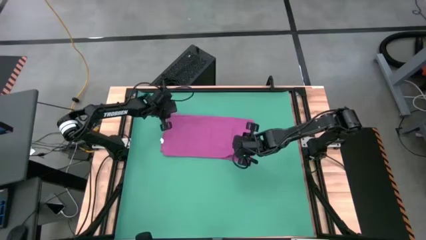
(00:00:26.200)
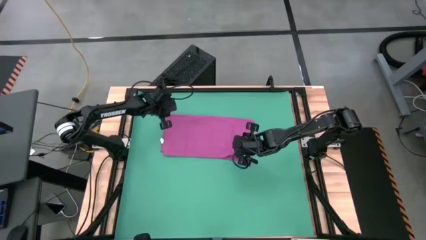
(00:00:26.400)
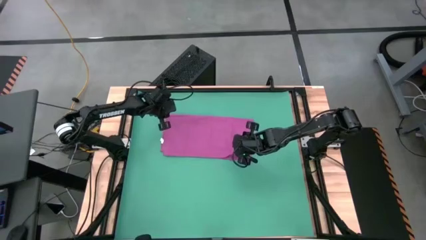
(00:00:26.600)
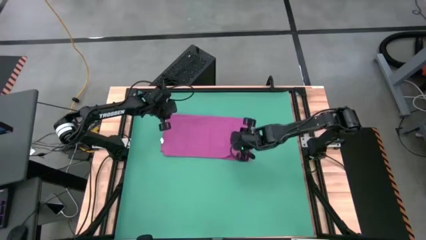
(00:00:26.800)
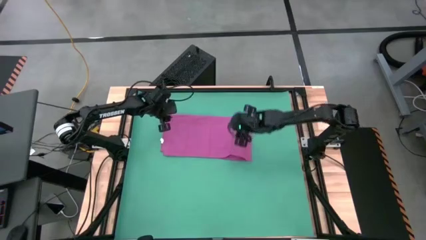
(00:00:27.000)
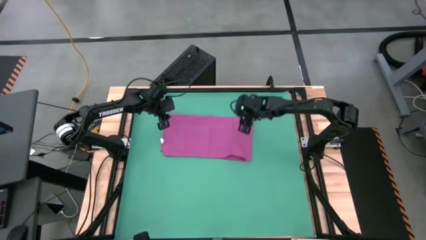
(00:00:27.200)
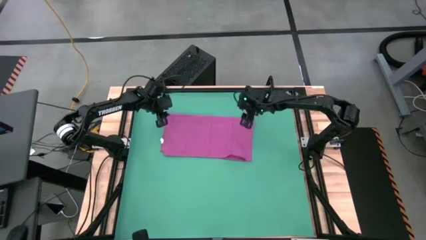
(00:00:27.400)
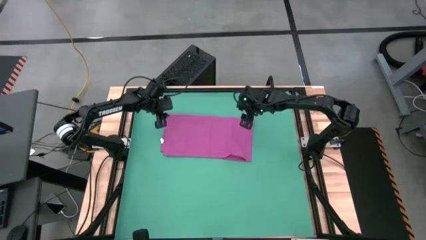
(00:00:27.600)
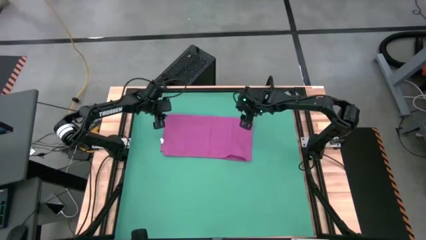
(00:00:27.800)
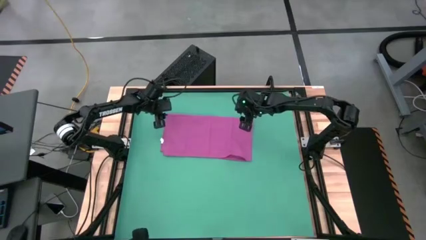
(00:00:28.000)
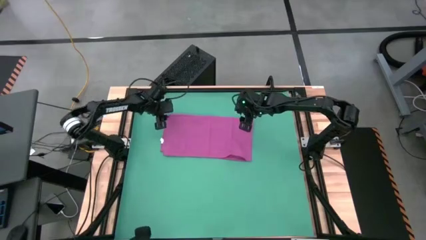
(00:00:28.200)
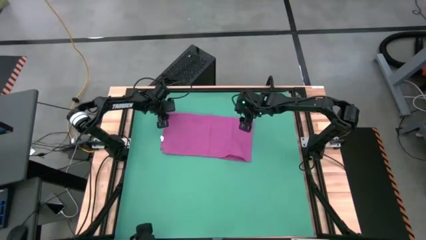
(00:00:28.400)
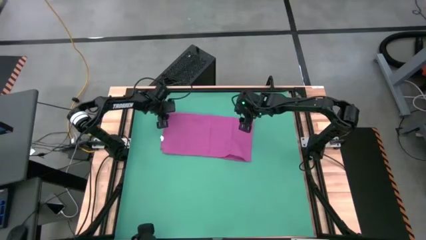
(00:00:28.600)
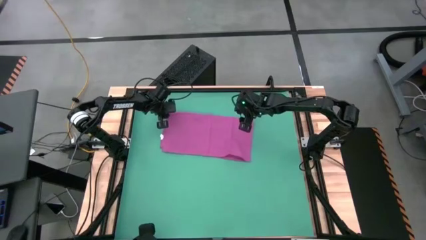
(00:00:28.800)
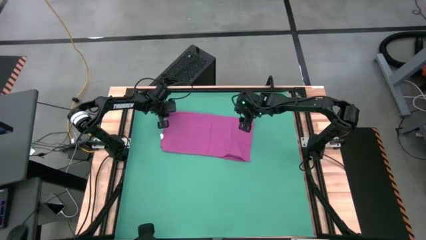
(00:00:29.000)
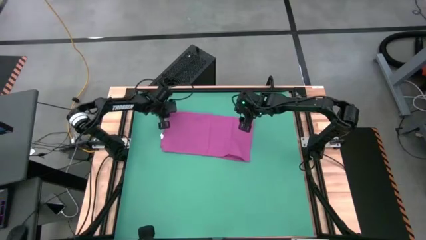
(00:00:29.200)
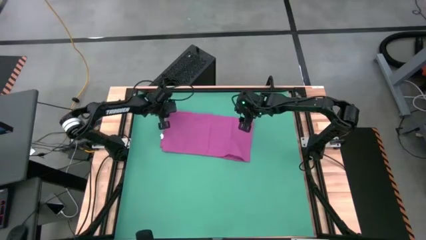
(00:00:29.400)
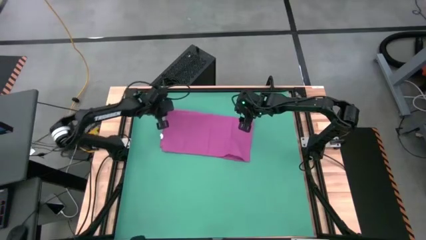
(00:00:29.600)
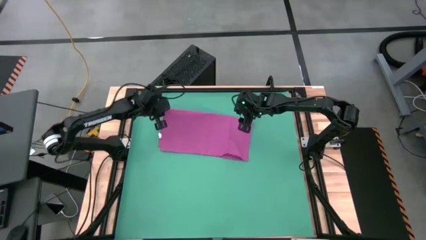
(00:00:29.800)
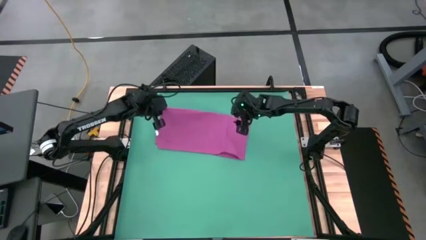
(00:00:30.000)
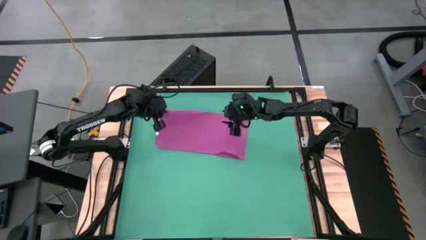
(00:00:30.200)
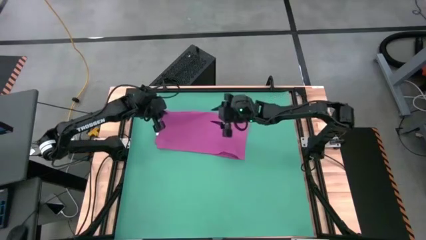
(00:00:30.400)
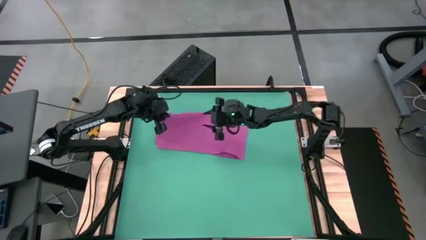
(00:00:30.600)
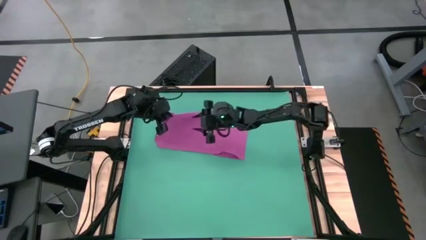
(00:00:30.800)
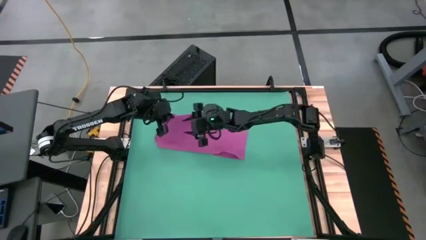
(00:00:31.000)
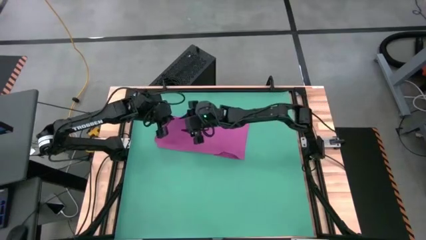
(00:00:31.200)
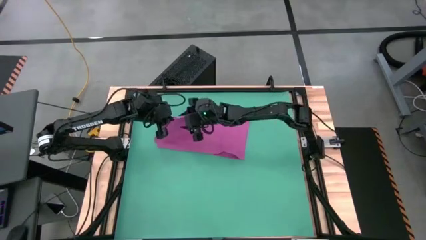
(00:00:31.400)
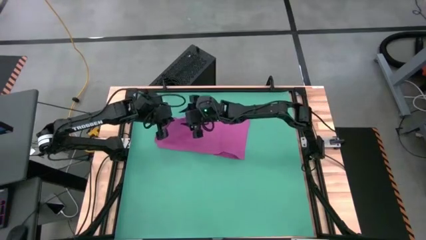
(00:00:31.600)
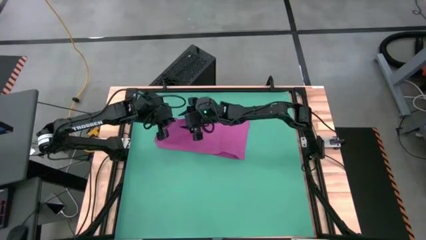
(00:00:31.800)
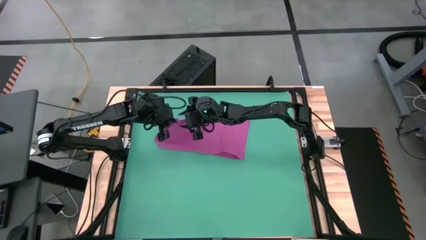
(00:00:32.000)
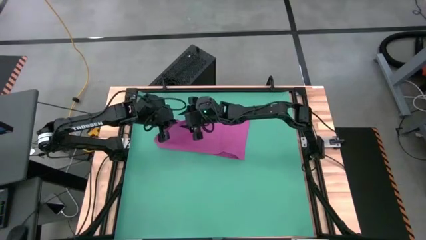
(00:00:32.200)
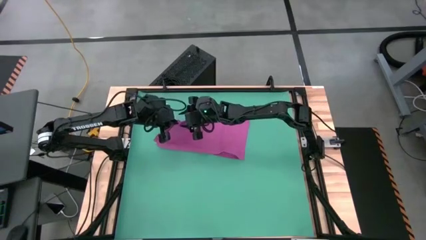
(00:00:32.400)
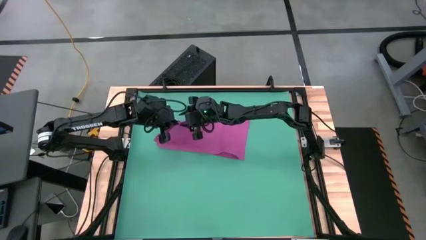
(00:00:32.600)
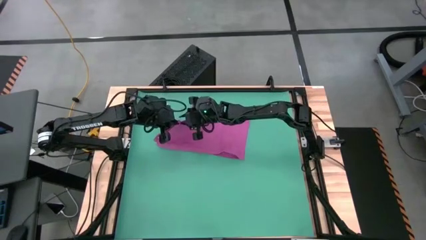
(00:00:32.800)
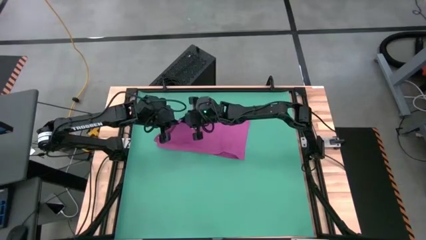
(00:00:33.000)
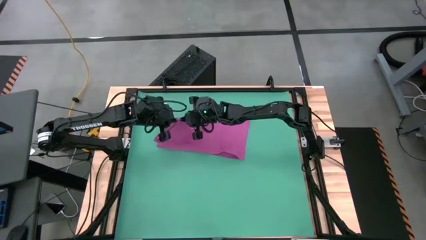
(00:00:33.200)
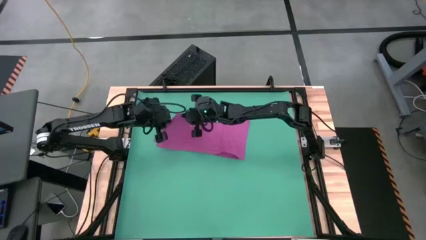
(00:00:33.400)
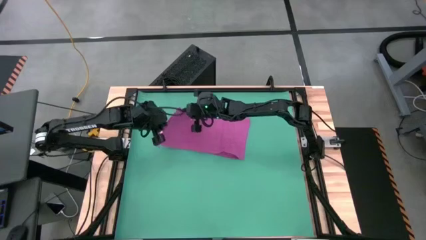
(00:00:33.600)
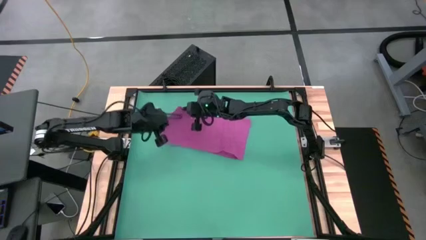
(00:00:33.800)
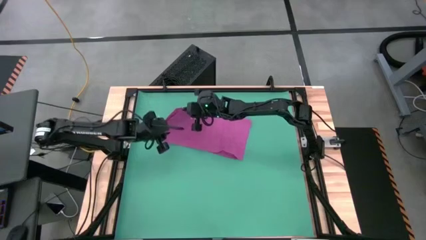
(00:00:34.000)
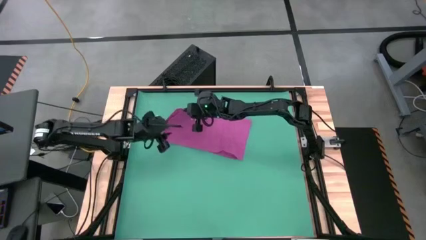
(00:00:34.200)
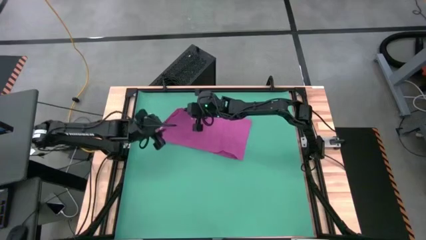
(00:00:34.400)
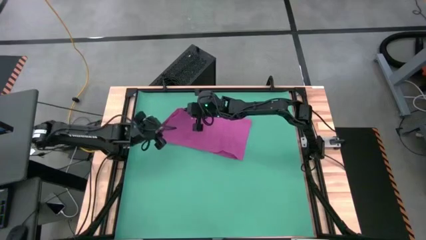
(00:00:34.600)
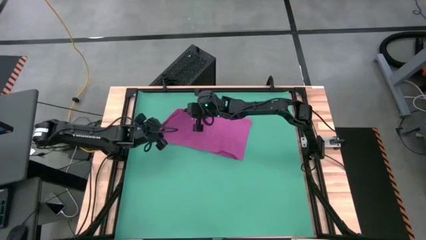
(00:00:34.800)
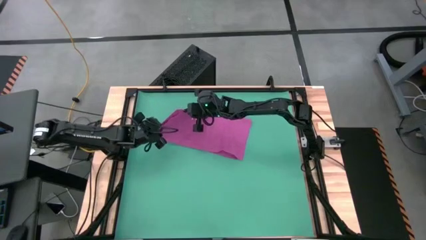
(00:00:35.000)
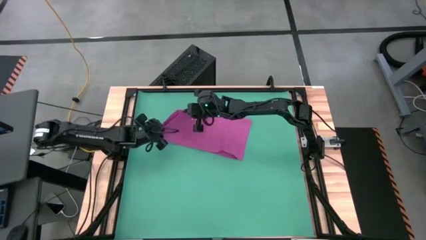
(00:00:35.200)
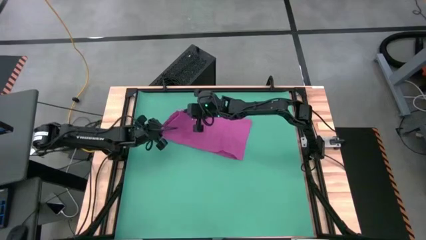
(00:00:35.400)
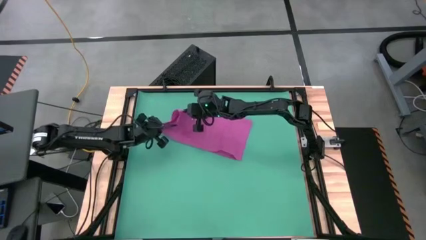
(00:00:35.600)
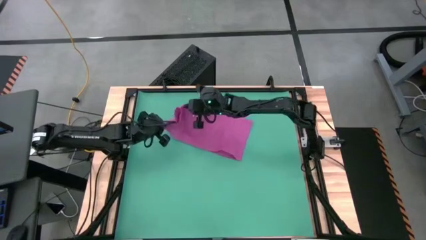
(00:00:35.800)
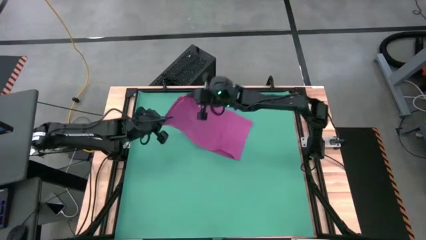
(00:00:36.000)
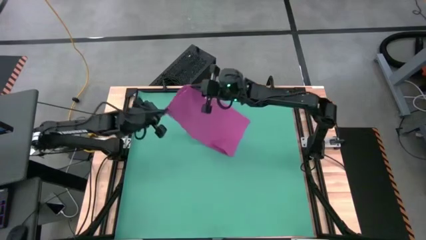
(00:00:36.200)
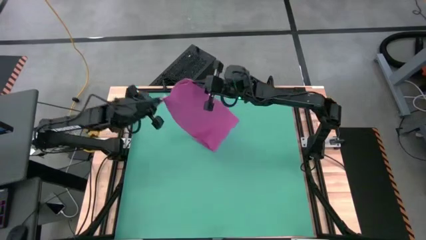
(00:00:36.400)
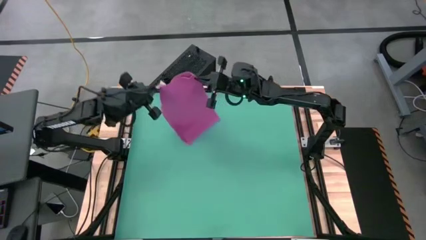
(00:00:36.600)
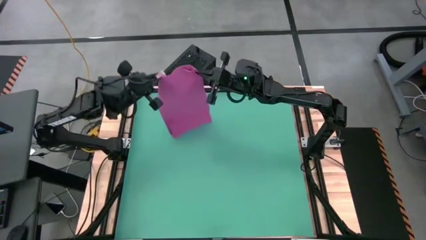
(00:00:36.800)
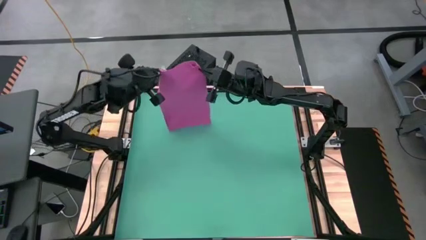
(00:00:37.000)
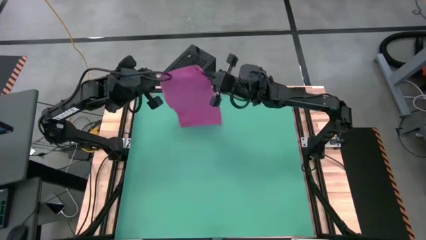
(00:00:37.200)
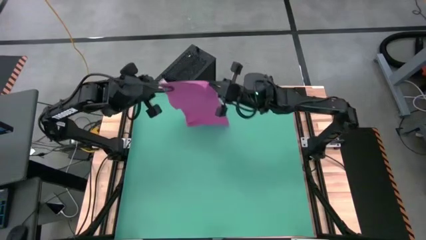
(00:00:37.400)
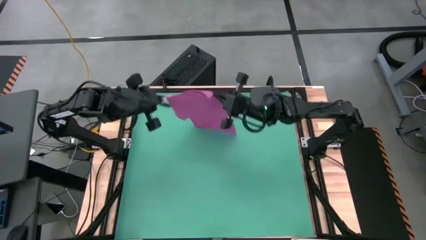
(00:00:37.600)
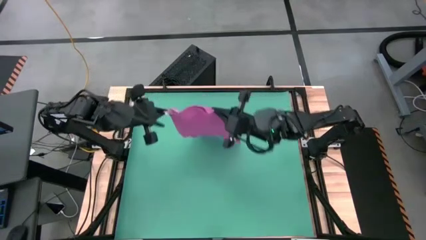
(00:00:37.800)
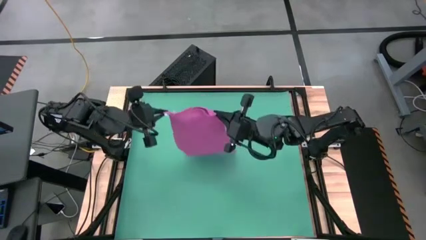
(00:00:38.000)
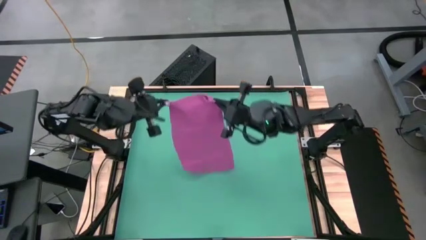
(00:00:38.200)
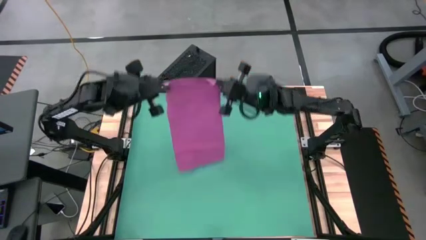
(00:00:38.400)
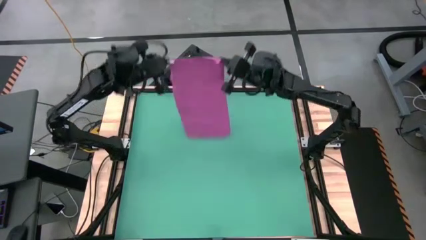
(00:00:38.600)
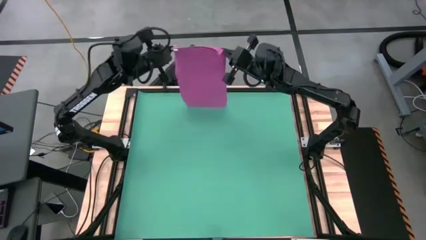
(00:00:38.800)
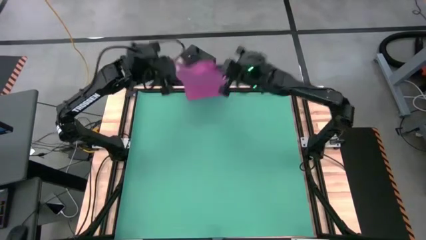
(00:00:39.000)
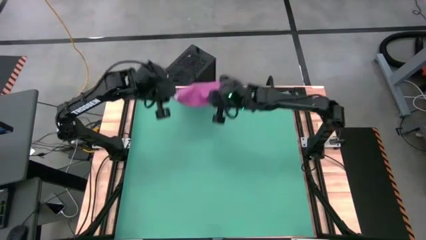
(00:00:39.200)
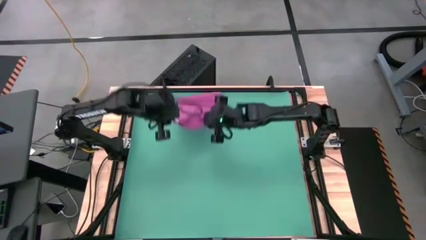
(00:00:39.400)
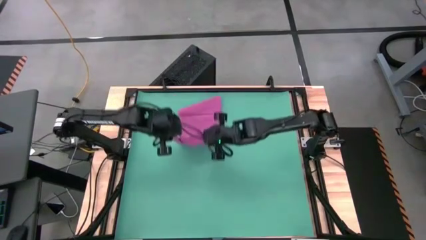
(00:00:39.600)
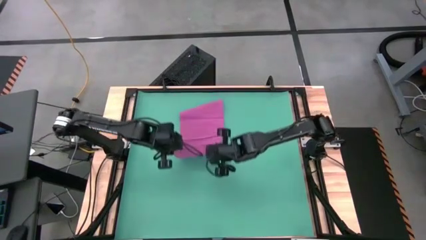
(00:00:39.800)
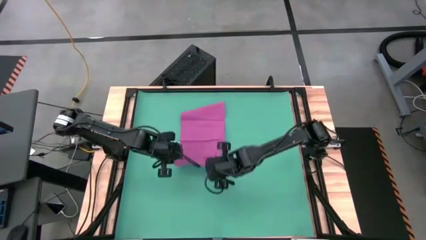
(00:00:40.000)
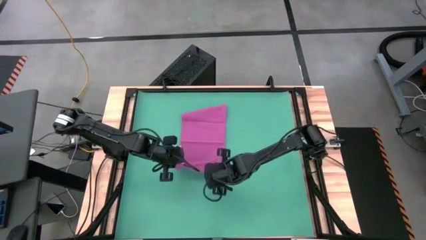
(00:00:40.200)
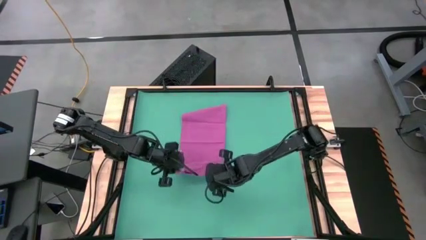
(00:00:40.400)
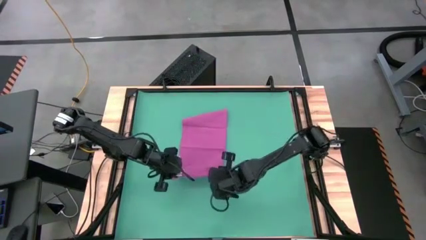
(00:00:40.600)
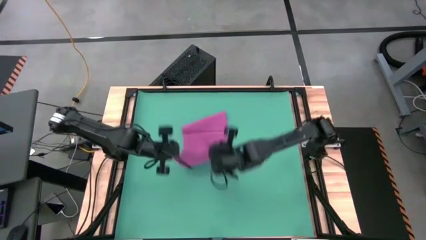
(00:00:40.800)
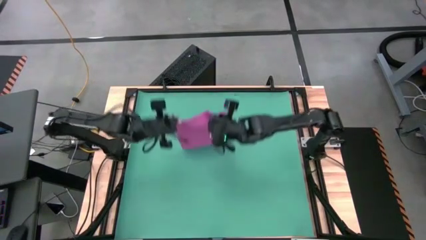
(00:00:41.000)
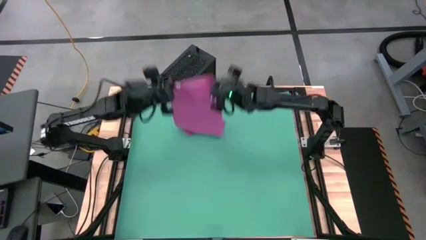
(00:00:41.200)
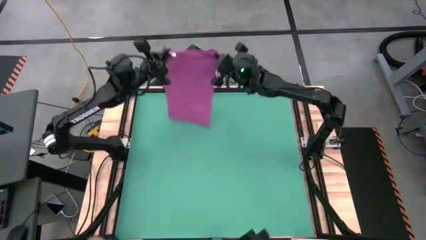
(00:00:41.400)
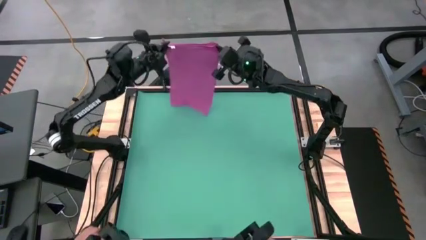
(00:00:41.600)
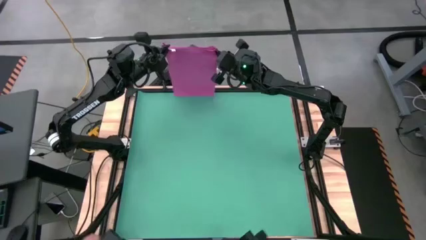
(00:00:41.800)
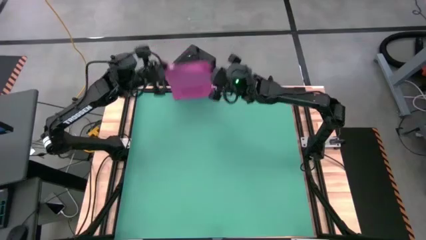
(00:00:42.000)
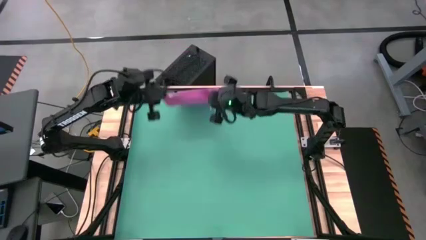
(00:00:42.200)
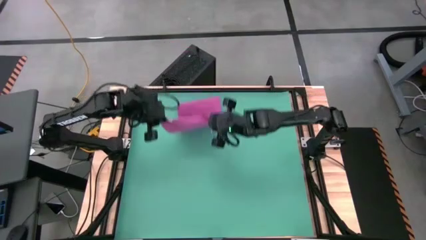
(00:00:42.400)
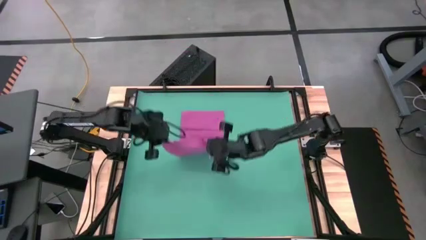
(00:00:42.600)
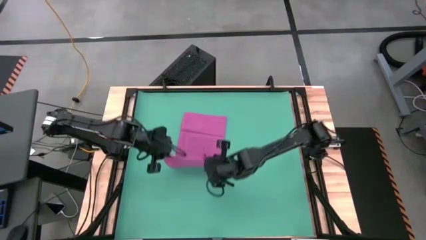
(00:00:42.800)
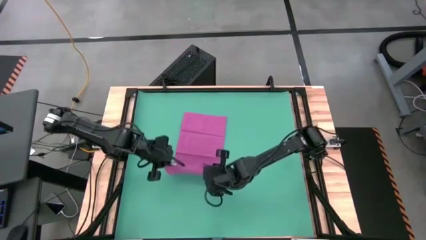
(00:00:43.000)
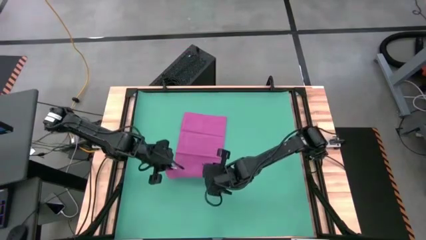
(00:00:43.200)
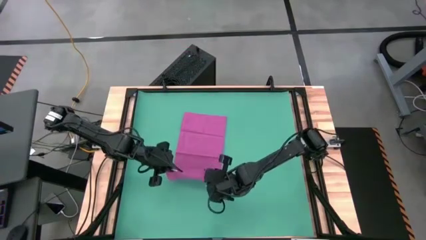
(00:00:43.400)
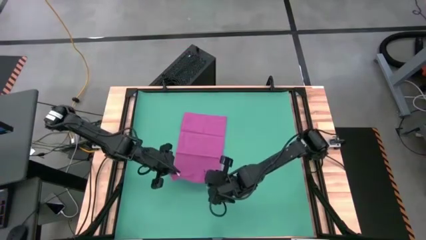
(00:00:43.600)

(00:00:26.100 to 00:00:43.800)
Task: Roll towel
Roll the pink towel
